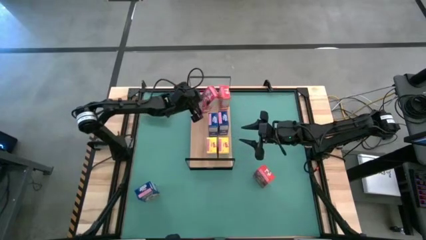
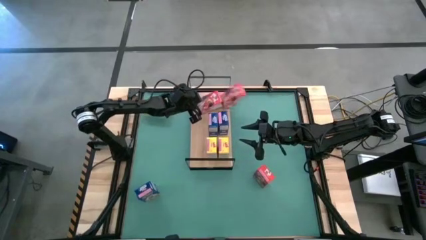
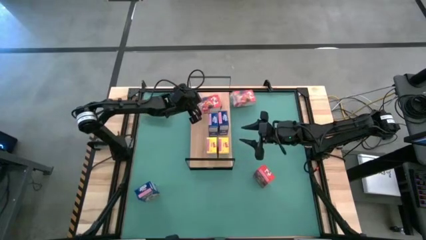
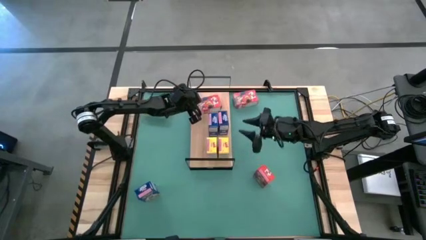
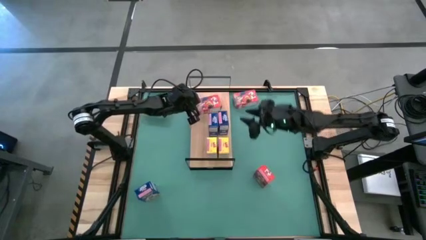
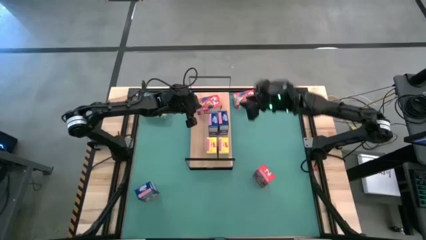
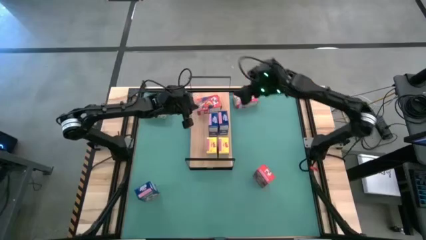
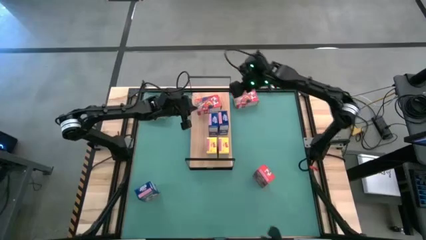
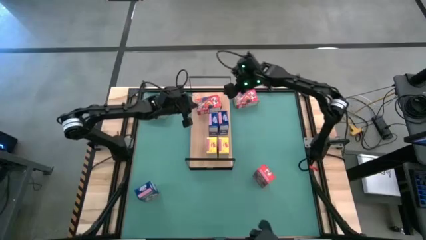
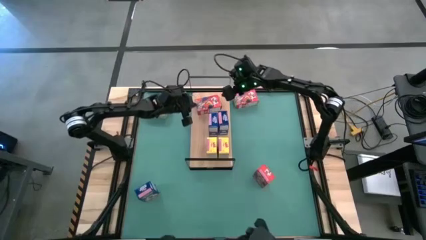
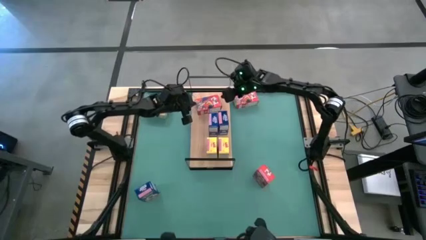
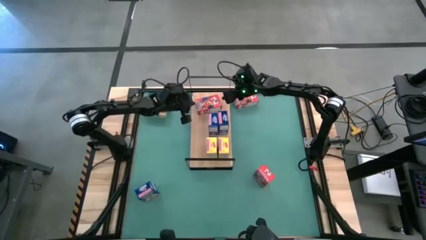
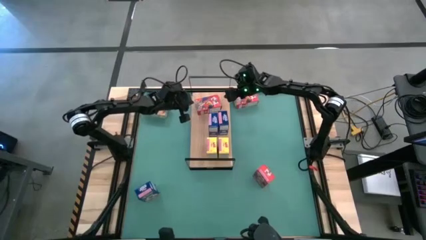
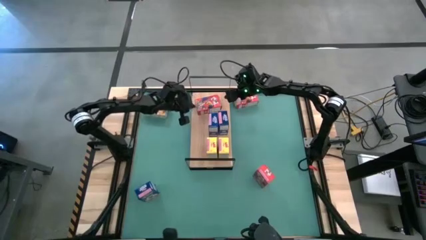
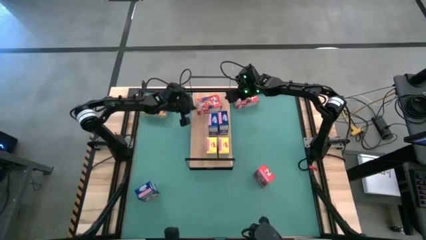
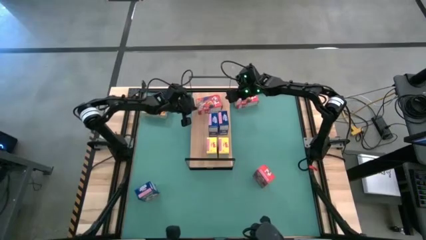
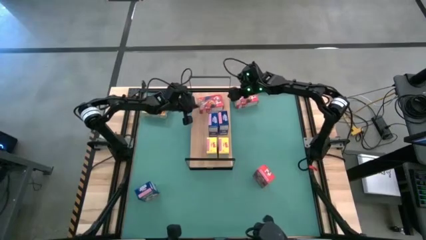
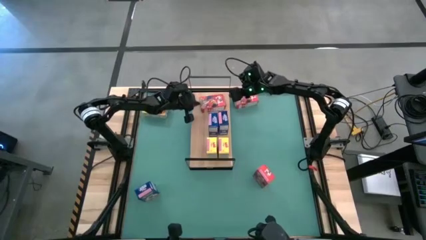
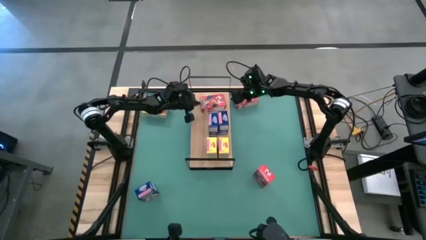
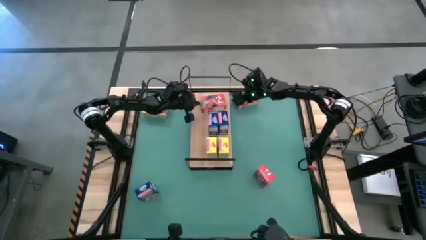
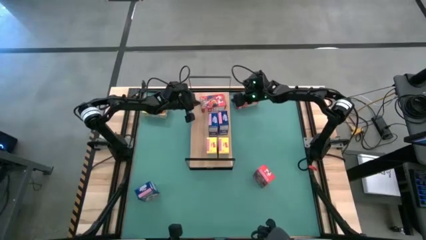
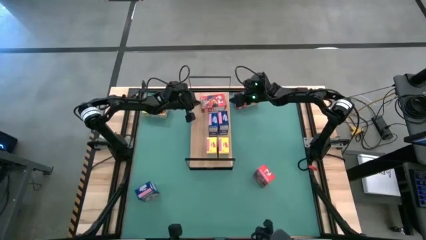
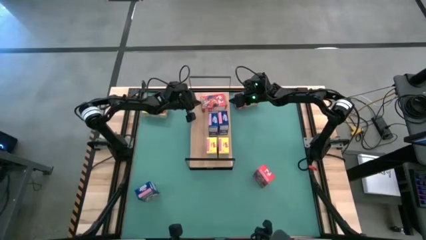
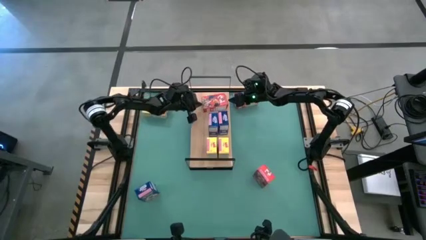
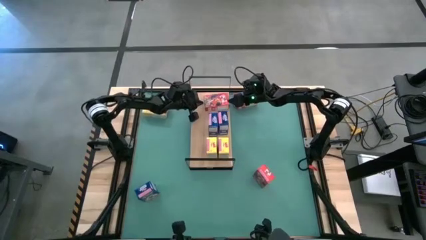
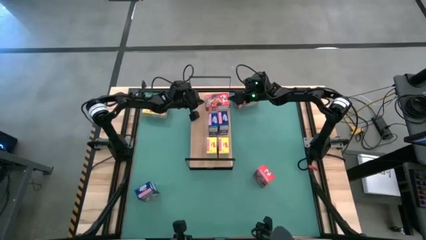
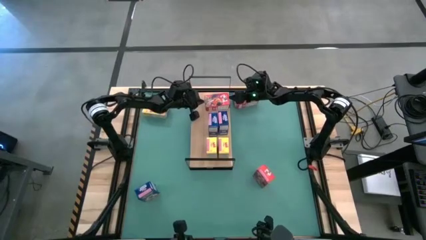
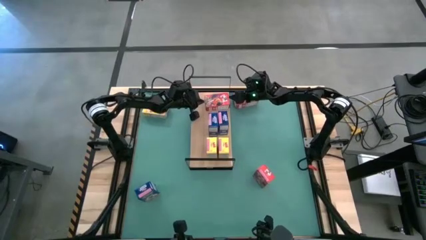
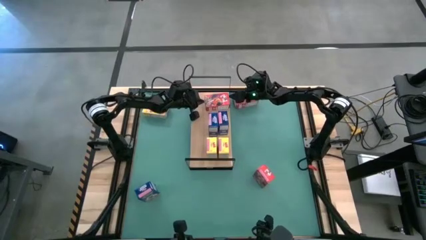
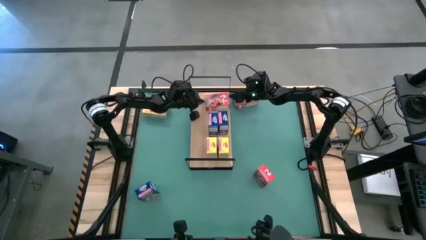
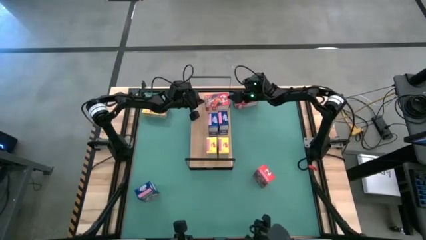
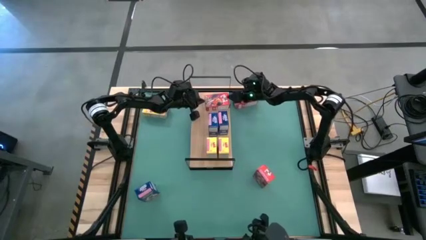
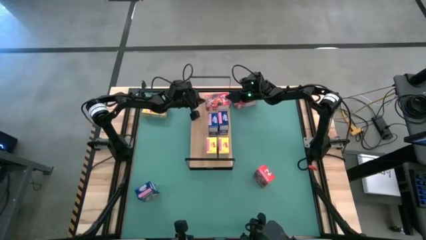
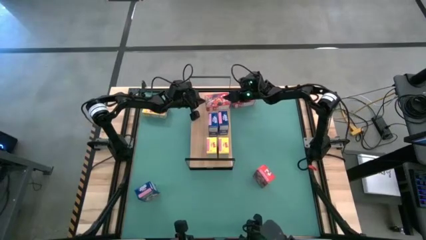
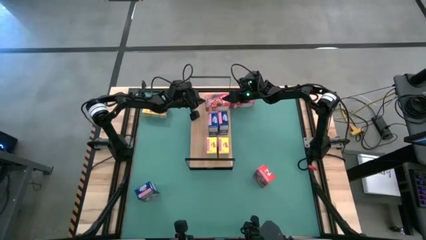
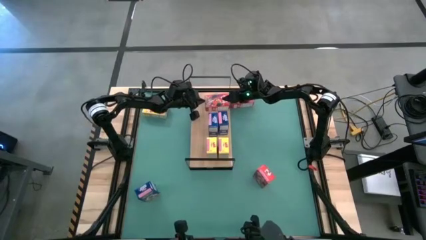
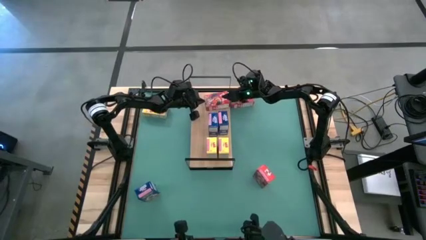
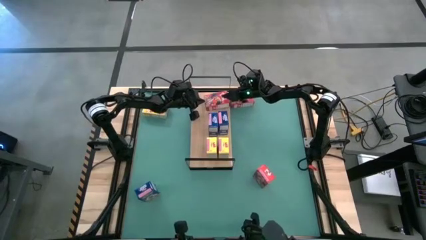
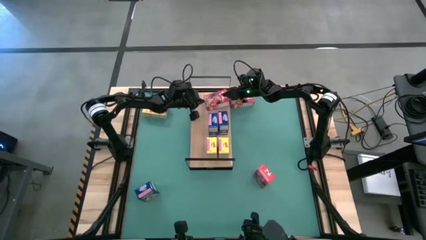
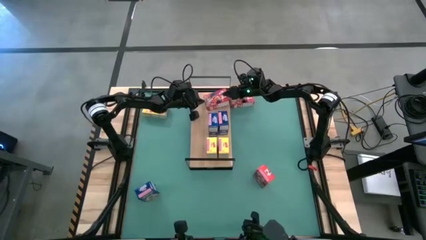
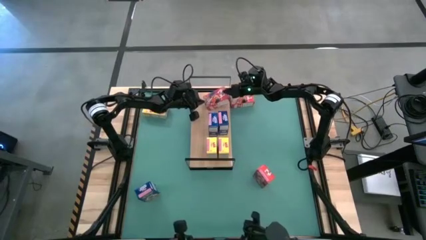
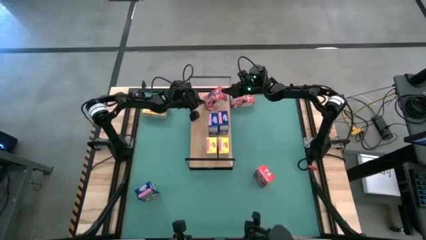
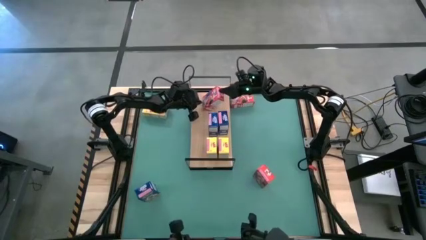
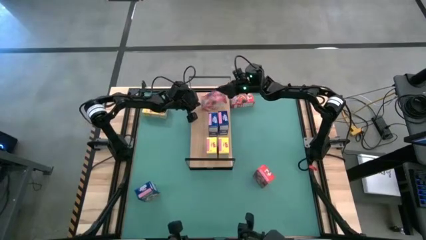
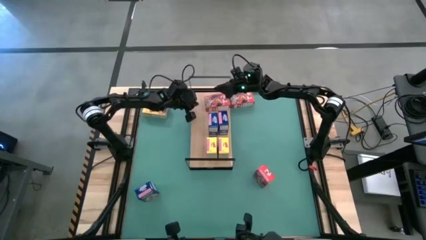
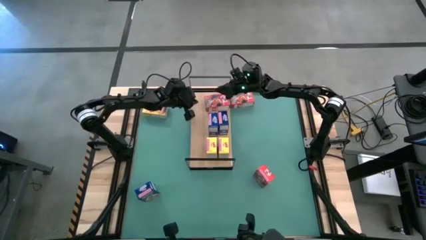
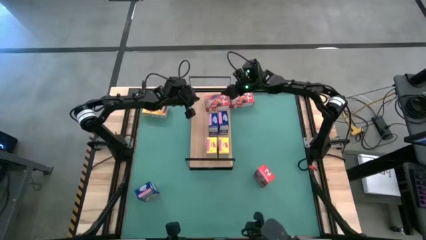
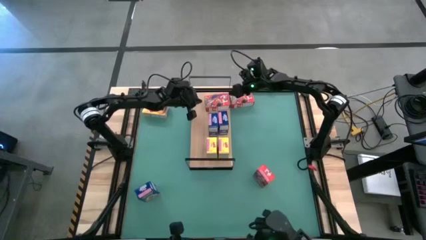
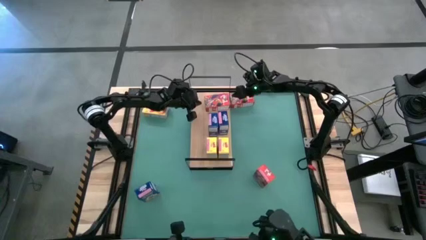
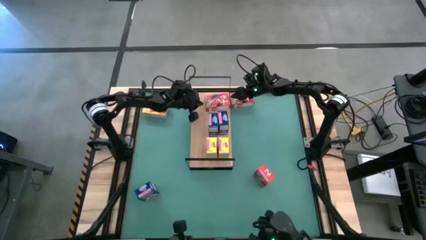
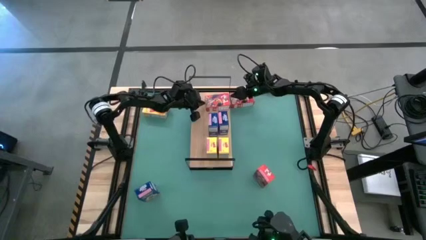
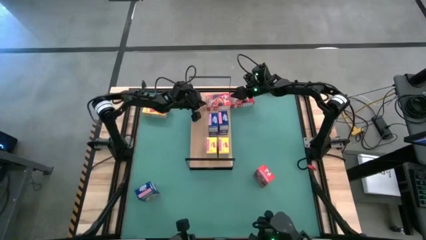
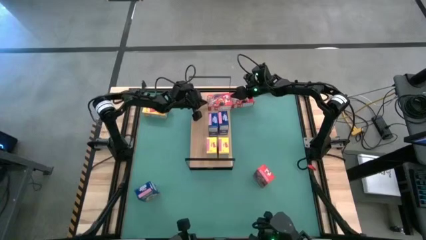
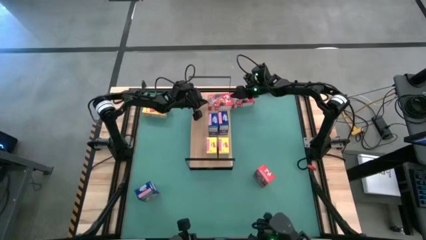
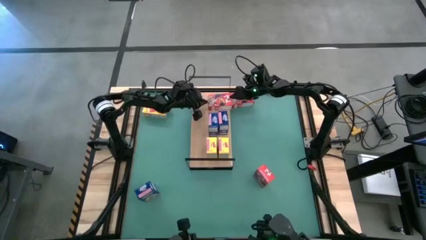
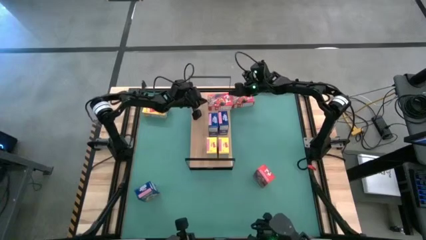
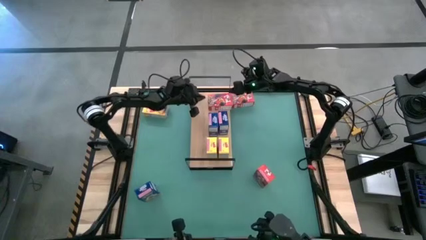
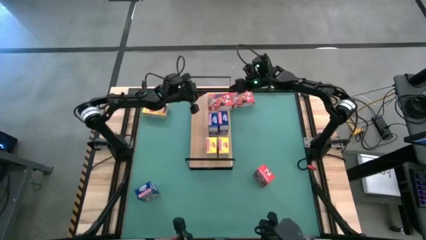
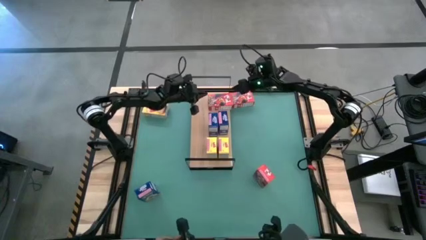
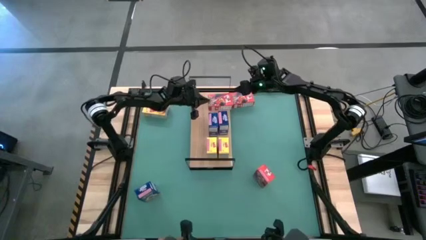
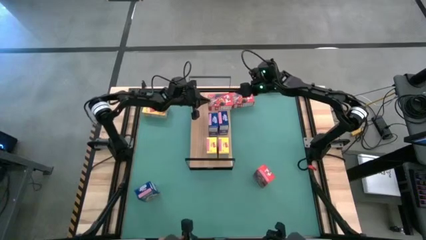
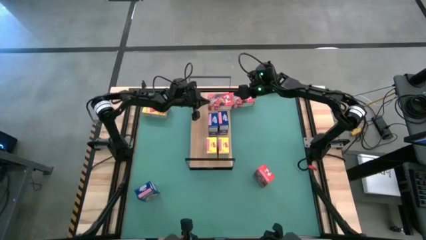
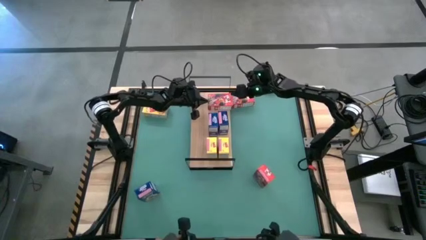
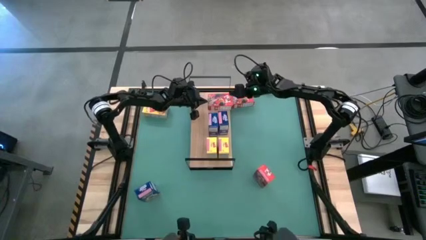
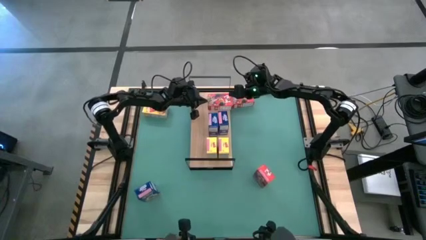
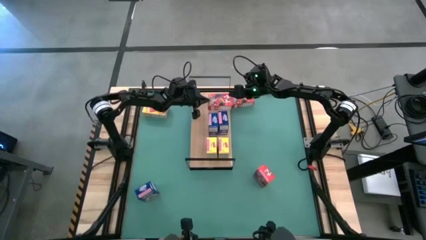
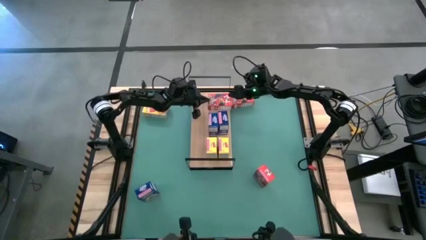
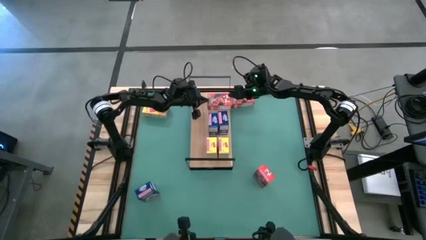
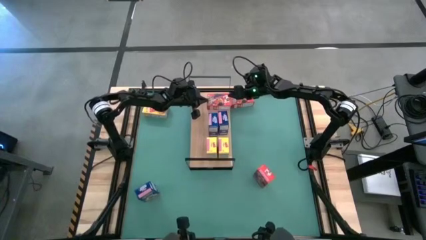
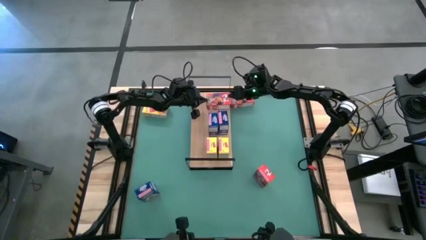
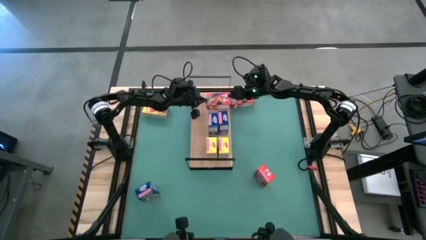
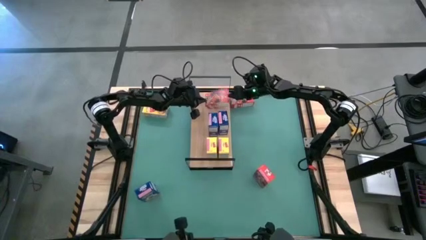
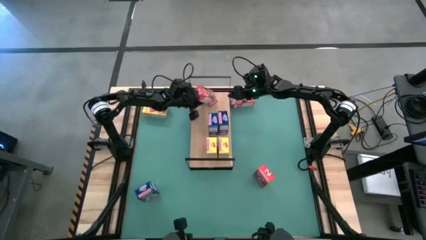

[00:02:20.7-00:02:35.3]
Task: Stack cereal on shelf
Put the top red cereal box on the shelf

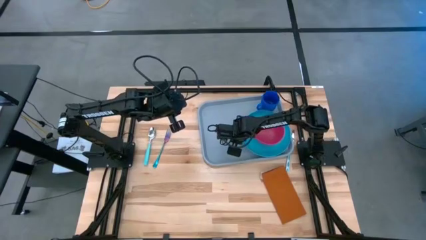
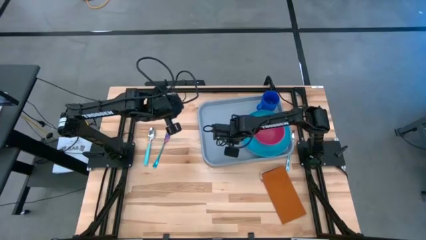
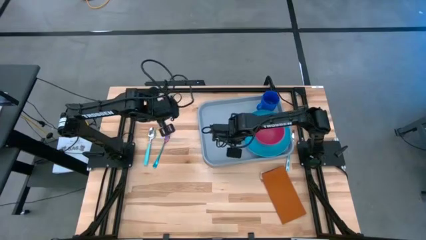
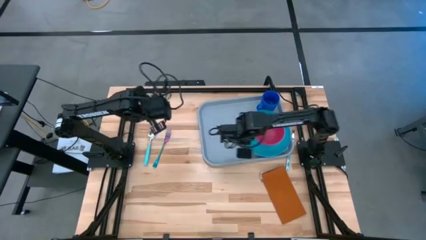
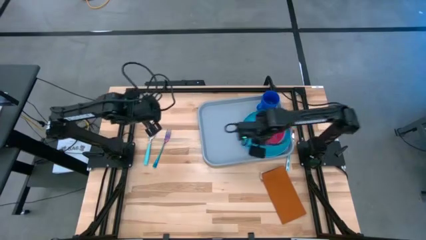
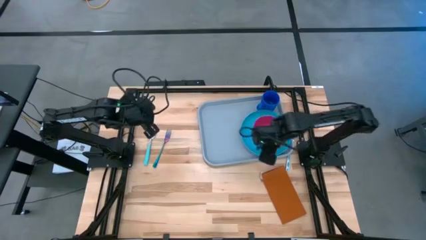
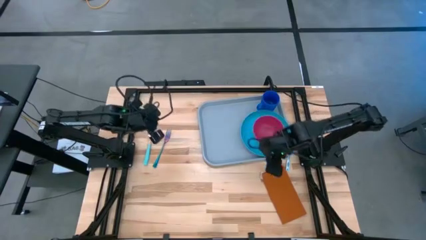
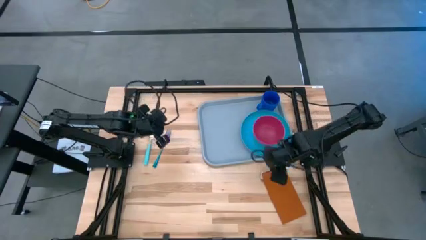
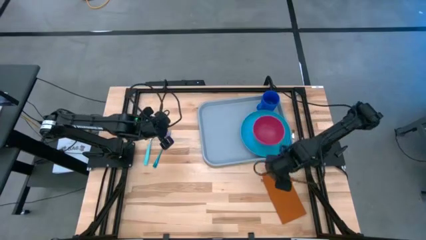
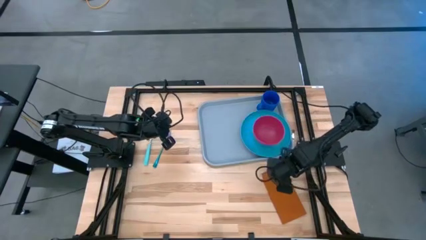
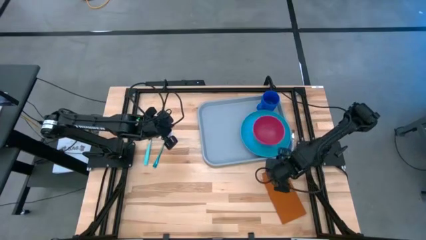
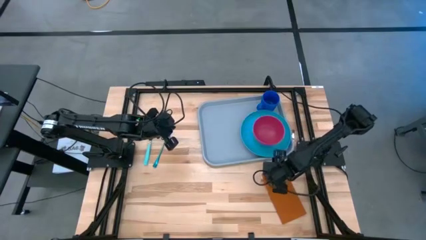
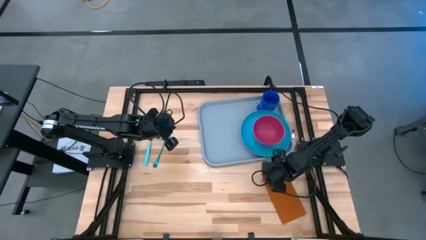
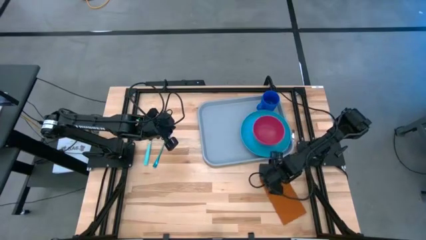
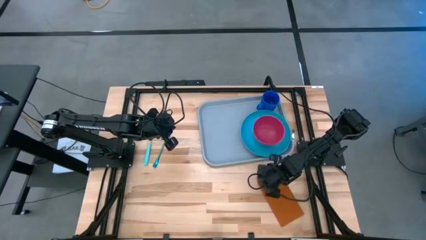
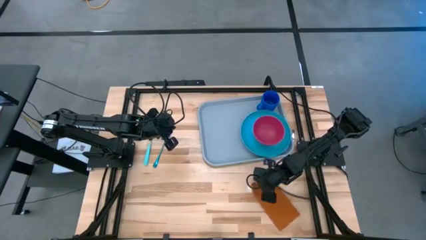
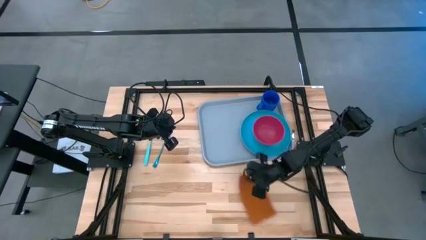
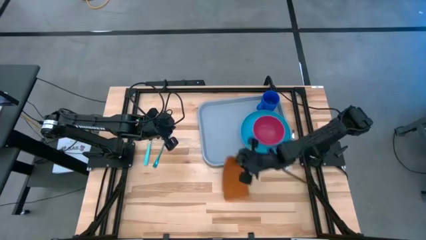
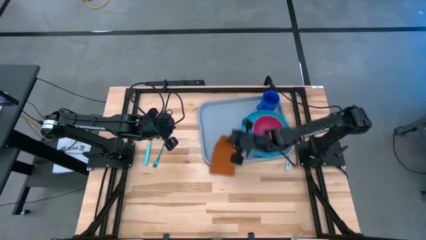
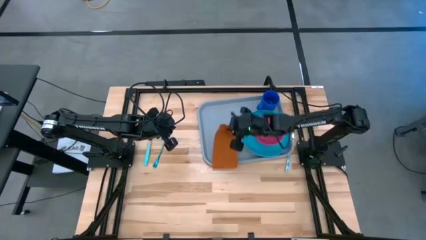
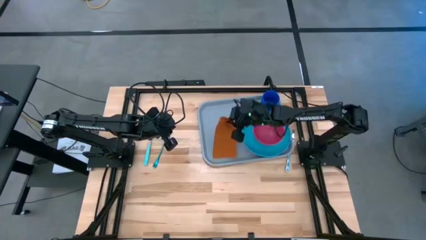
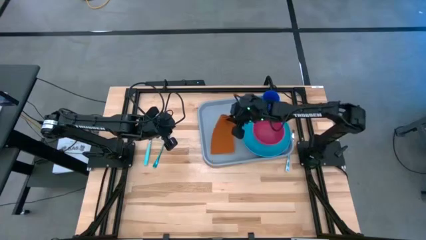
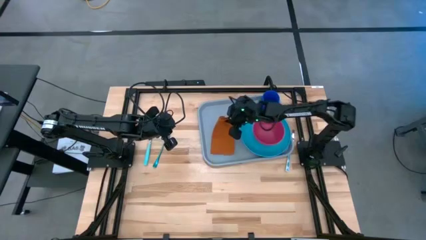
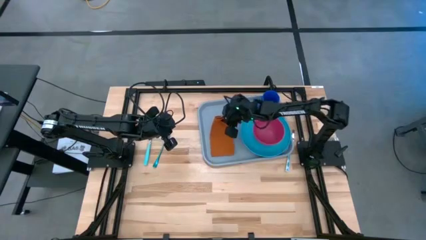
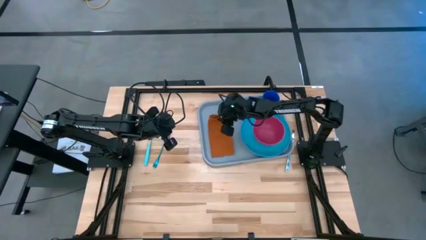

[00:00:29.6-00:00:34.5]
Task: Set up tray
Put the brown table napkin on gray serving tray to the left of the blue plate
